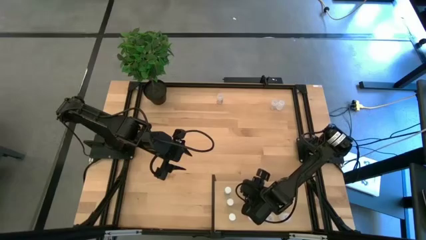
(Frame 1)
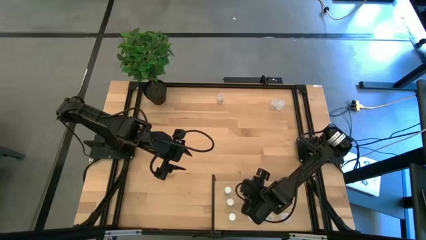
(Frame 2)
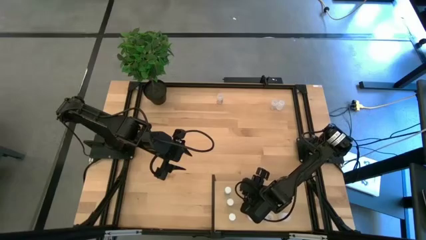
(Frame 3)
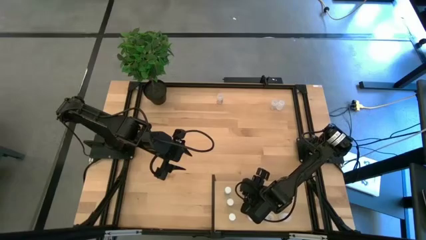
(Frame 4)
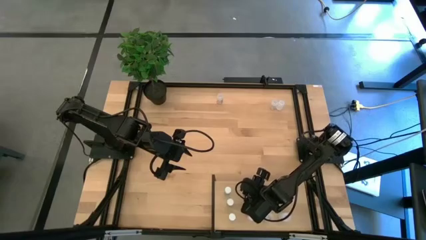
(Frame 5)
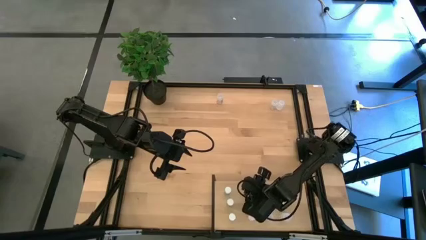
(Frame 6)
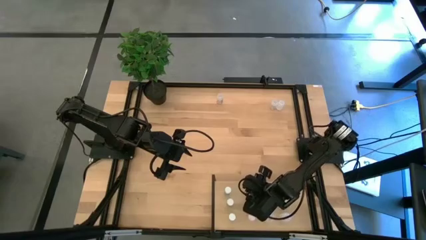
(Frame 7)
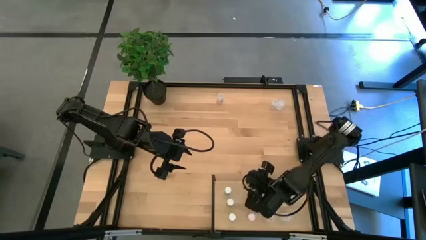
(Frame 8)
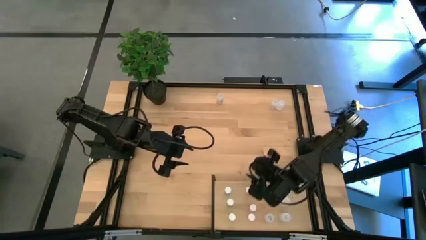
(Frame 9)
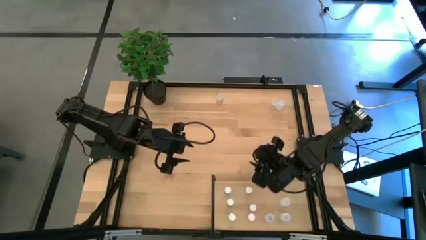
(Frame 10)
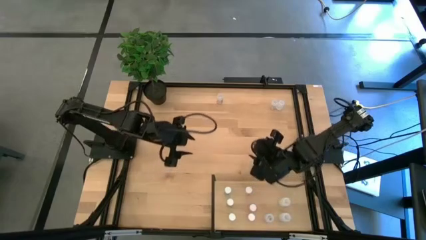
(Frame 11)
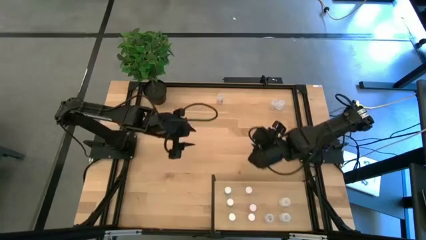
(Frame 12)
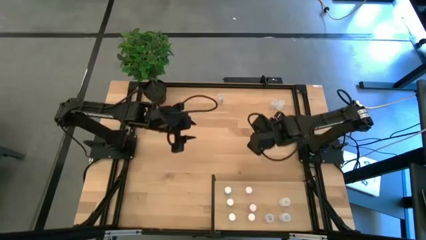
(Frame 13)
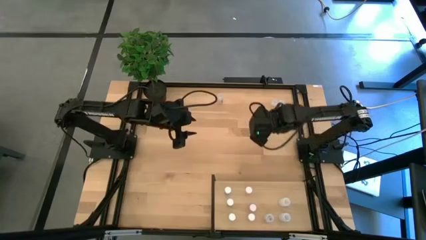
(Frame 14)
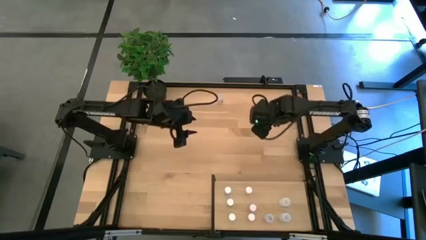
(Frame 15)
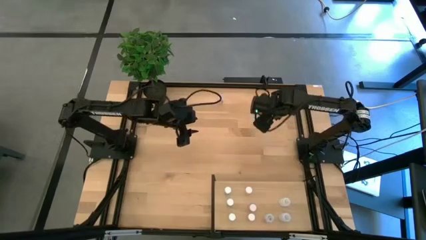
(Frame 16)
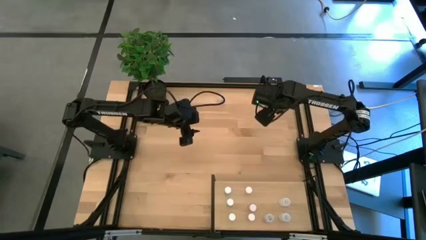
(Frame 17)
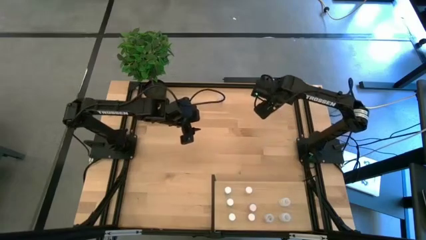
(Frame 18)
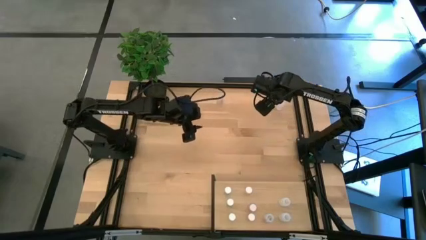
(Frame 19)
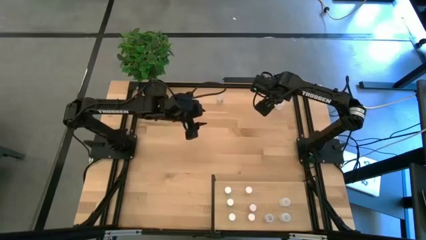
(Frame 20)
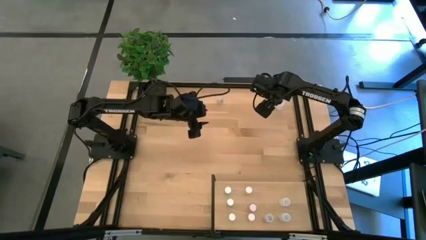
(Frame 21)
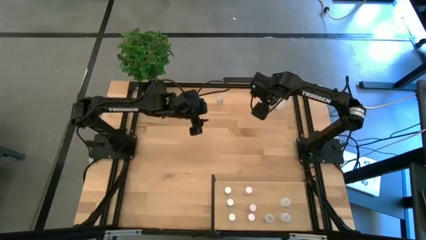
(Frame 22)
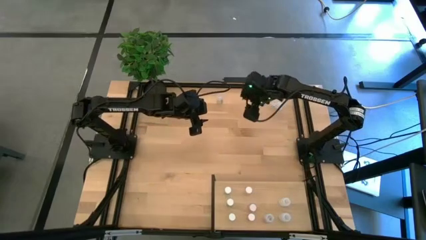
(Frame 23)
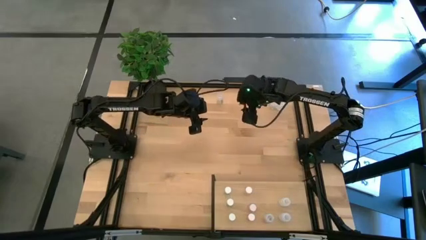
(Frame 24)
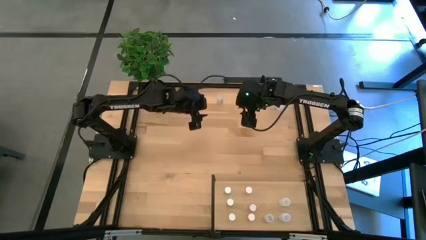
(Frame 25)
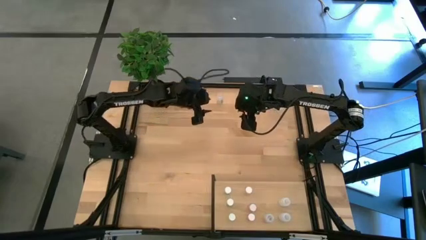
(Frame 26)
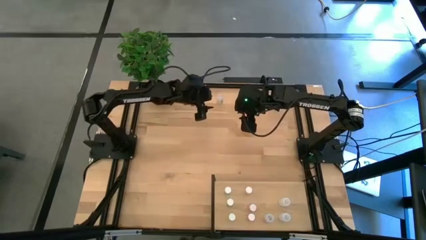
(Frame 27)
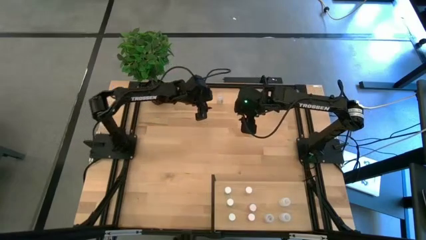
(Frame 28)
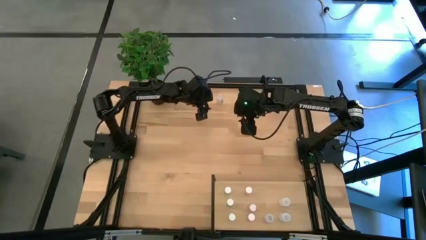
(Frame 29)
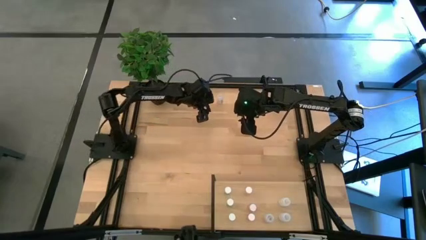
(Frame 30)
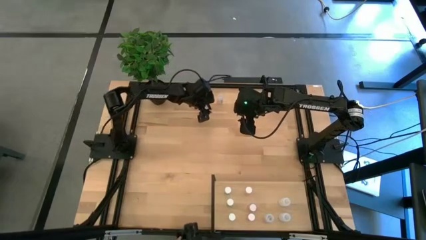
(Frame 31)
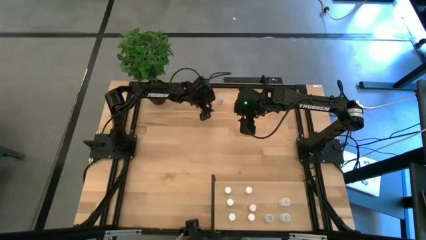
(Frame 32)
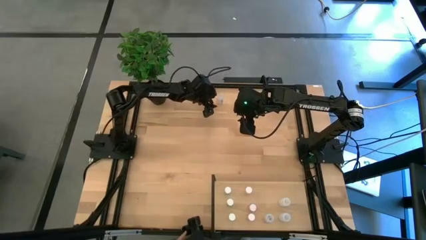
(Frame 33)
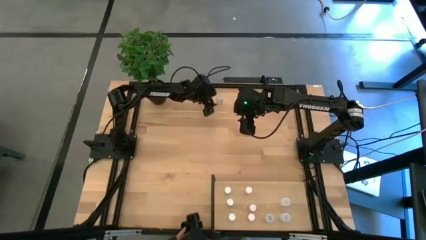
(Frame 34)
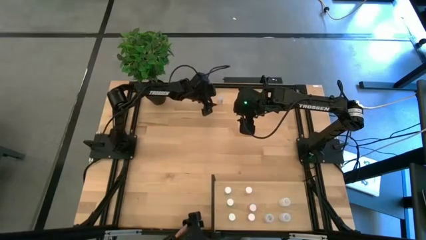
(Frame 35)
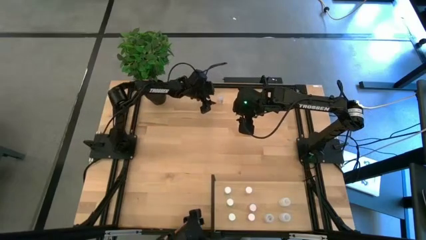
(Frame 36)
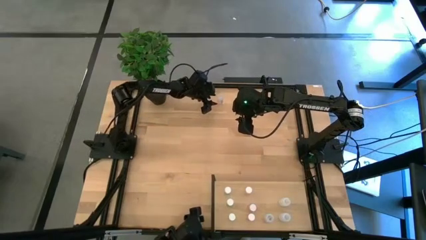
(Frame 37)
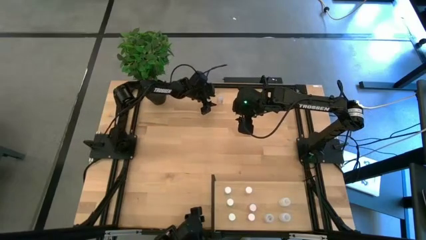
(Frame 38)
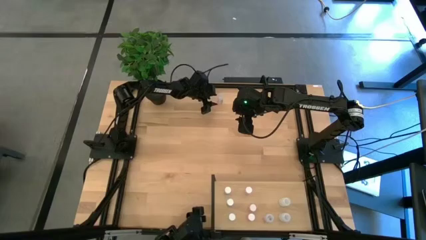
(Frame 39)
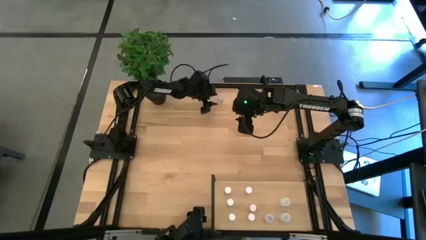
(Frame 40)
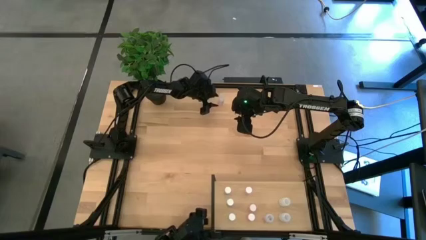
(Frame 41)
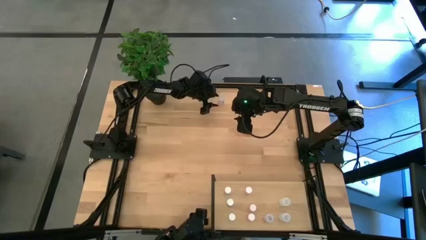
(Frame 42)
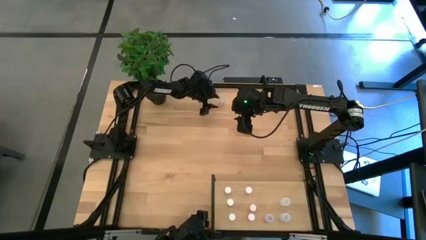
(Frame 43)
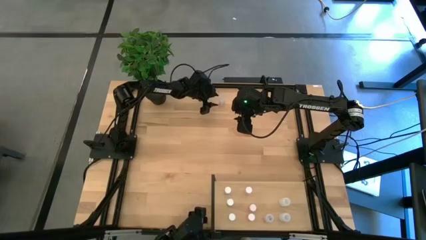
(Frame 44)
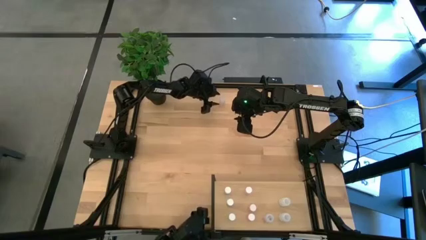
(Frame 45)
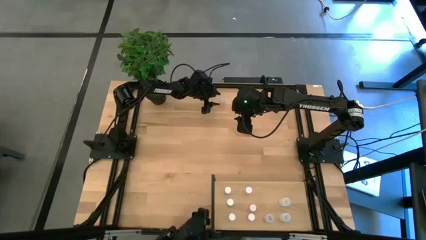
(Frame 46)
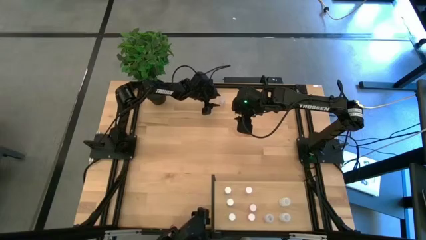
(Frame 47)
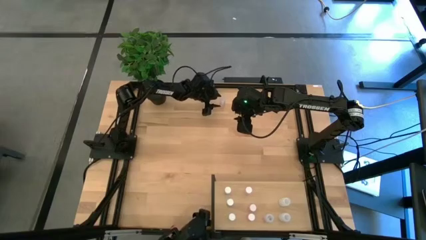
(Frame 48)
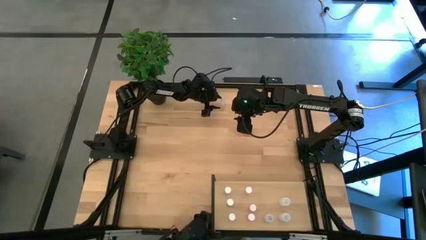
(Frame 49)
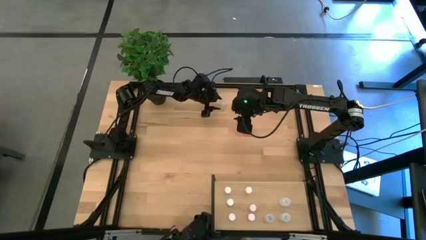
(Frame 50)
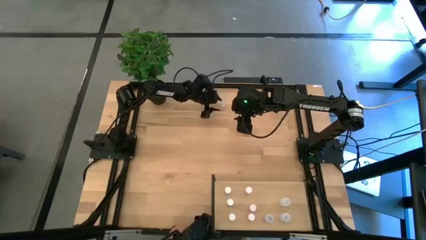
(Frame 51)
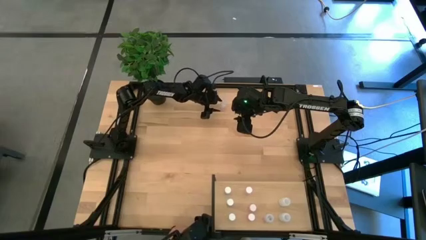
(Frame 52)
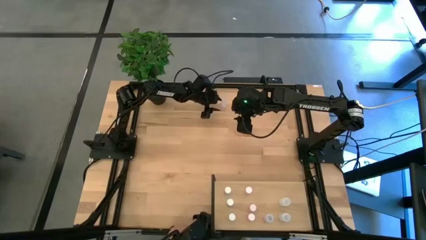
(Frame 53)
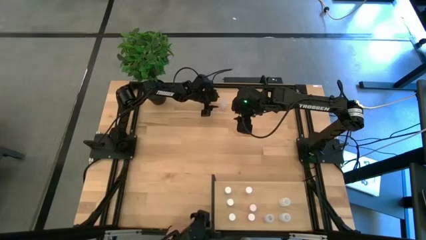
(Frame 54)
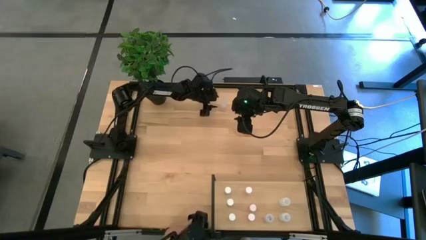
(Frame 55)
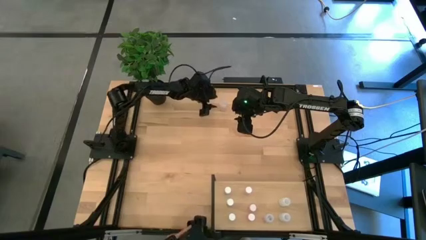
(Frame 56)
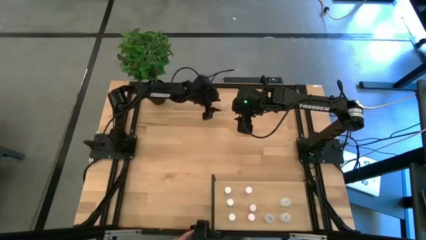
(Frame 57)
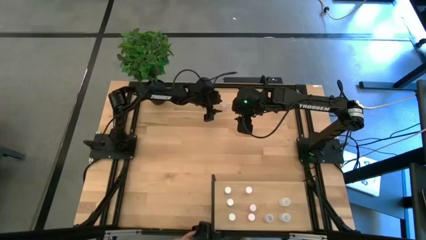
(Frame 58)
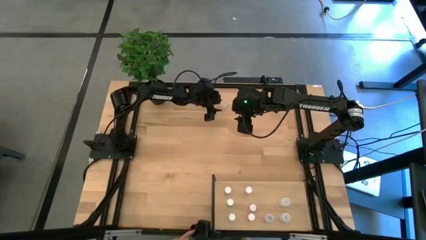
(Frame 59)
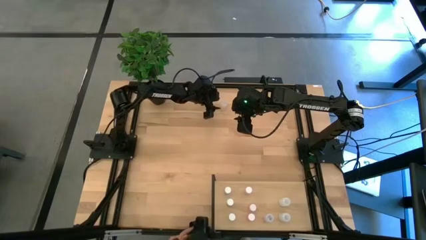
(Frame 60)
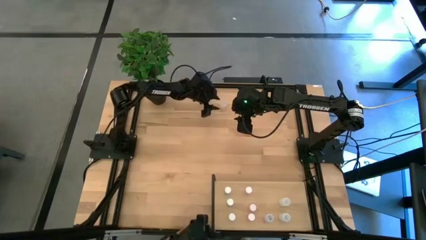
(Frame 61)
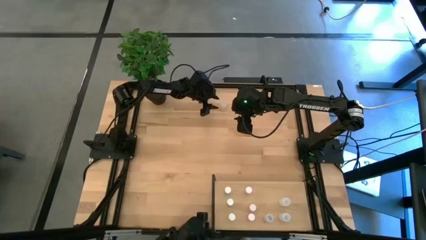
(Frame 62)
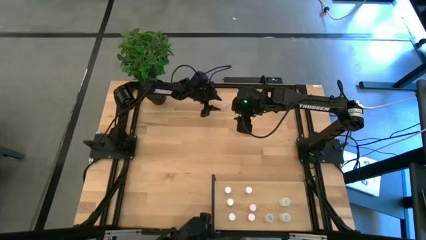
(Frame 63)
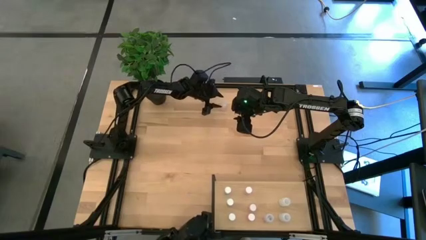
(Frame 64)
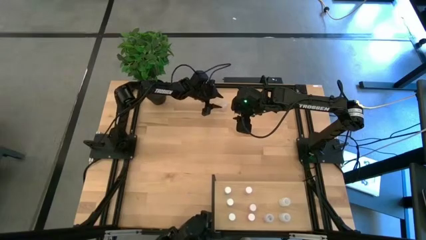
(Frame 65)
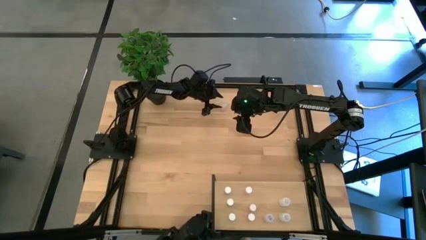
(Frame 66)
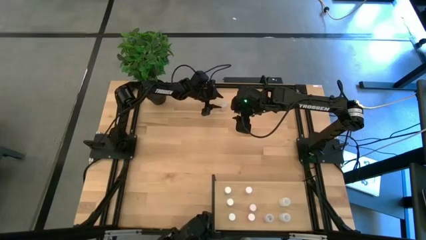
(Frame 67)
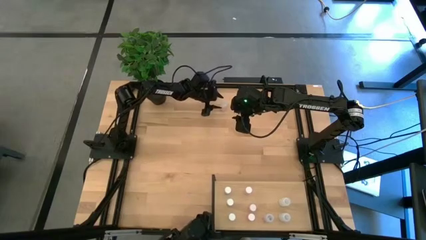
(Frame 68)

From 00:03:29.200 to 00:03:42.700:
Task: Pick and place medicine bottles onto shelf by color
Put the left transparent pill bottle on the shelf aligned with the other transparent pill bottle
